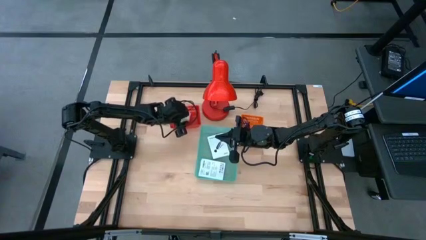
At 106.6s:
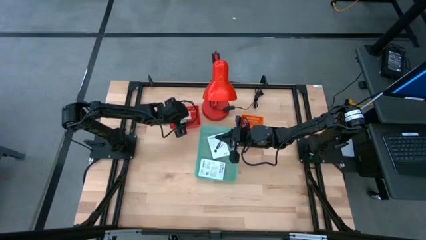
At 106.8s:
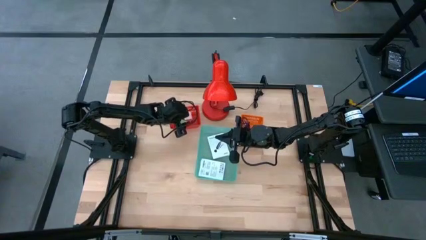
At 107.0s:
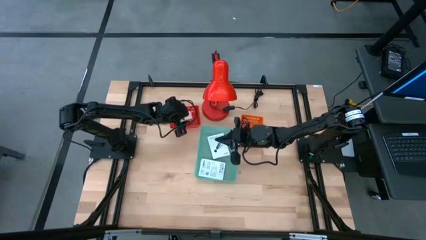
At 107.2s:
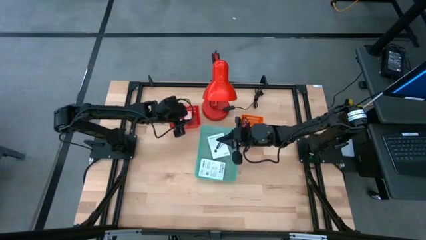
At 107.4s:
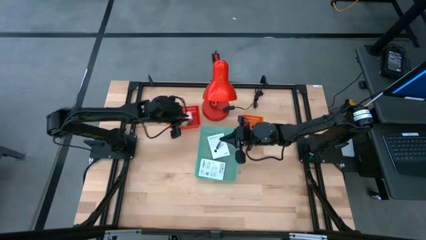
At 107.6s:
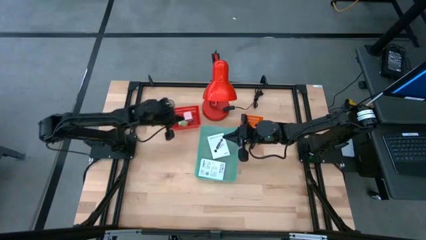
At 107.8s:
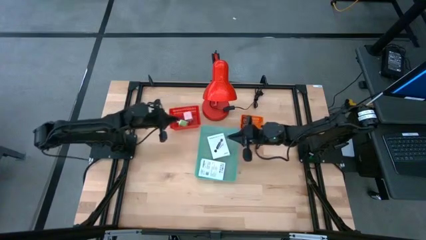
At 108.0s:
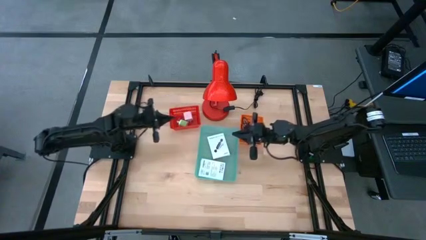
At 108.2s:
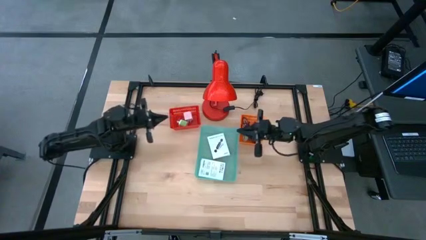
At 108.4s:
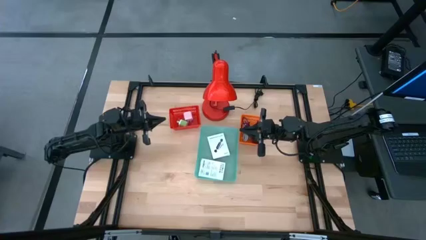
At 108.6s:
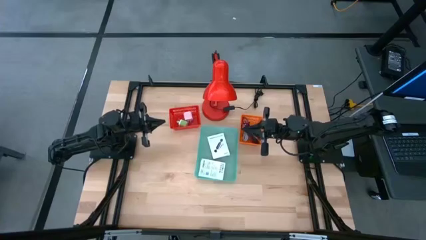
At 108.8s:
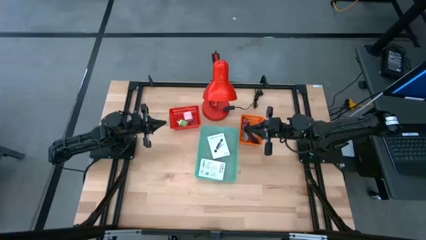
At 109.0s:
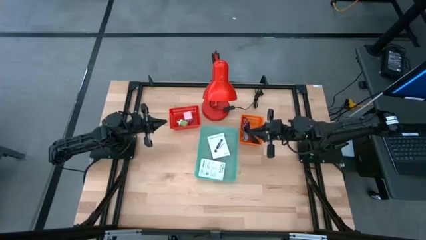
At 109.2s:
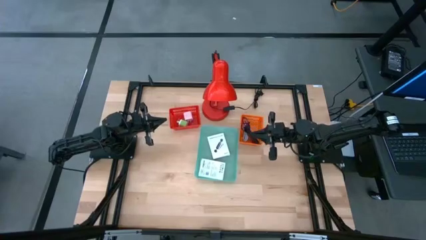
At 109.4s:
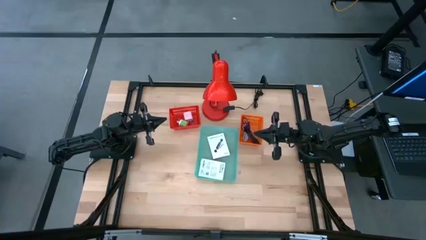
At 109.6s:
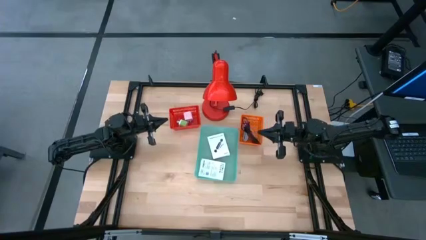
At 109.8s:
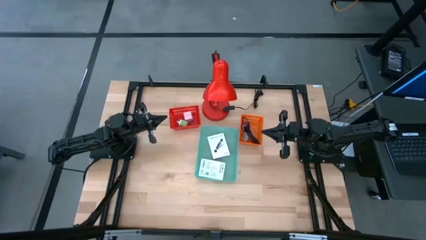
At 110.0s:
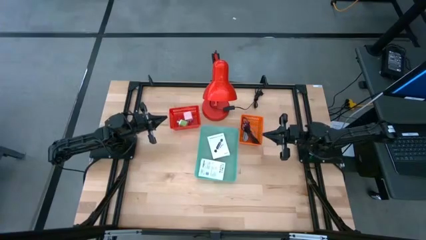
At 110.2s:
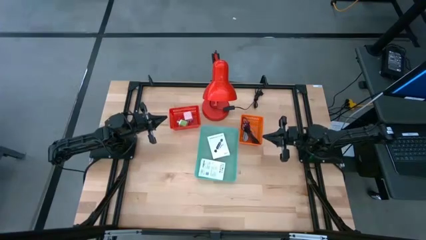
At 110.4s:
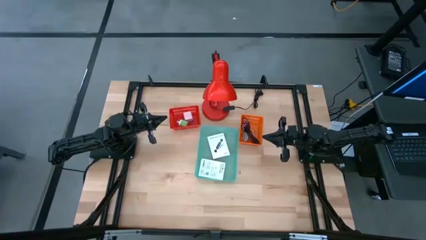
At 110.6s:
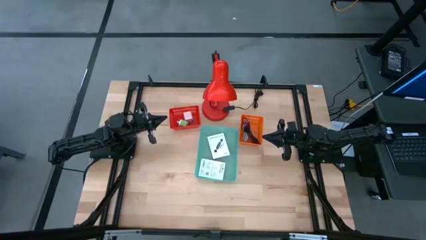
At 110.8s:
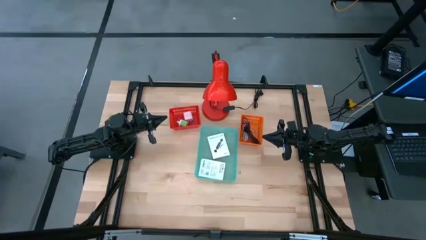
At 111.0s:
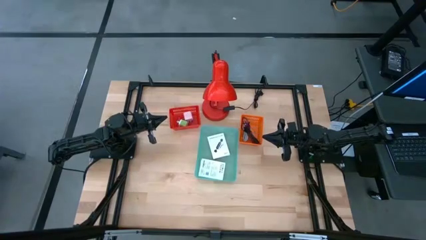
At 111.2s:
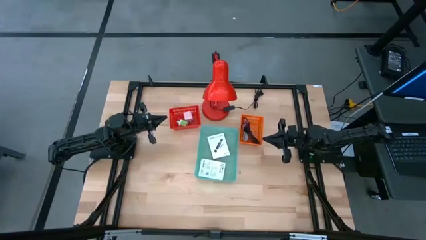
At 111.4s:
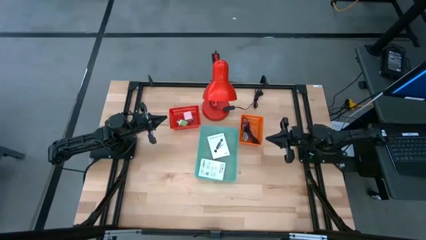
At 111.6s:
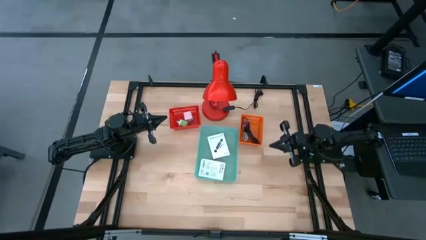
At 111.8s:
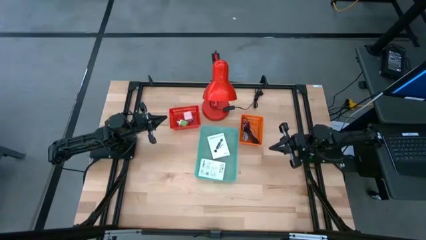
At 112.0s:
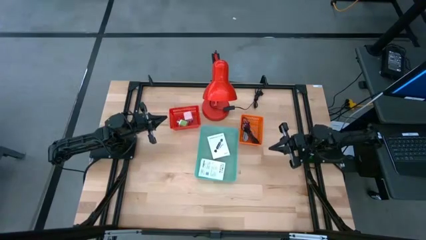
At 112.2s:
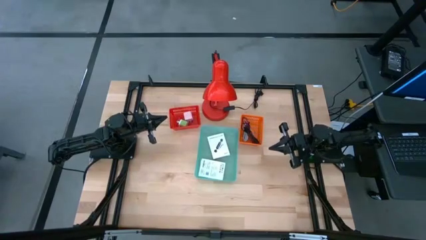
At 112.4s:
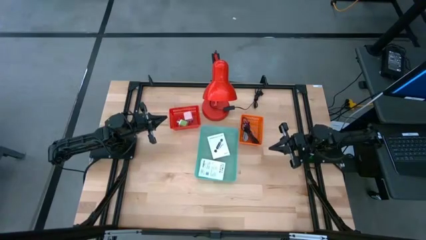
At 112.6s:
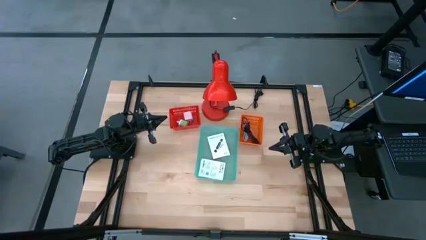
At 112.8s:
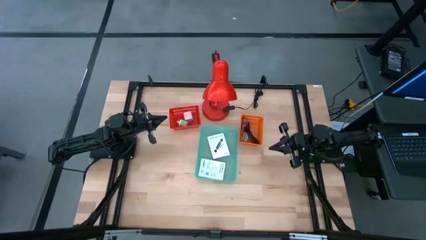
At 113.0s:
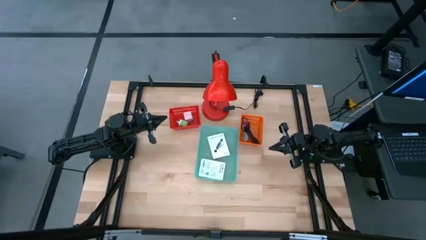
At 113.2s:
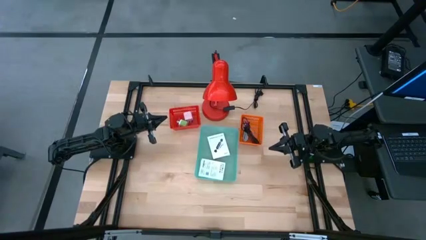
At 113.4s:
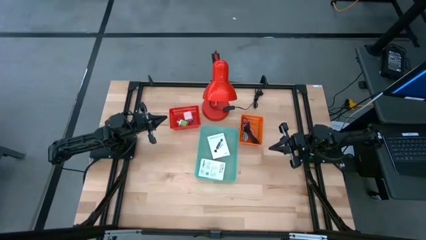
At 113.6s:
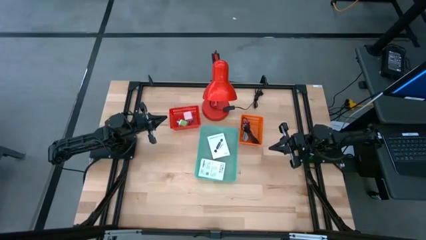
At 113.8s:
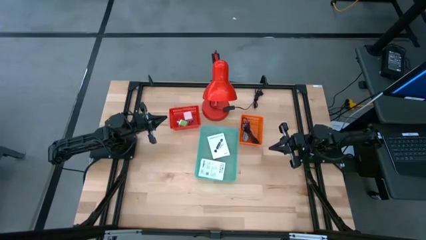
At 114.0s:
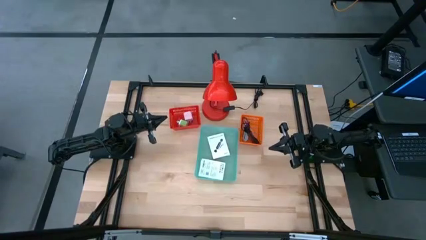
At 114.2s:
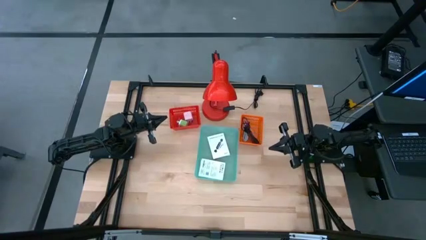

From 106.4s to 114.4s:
Task: Pick and place items into bin
Return to Home Position

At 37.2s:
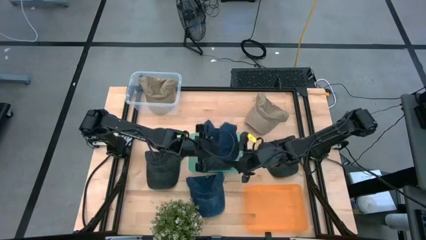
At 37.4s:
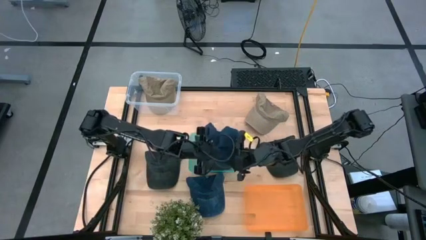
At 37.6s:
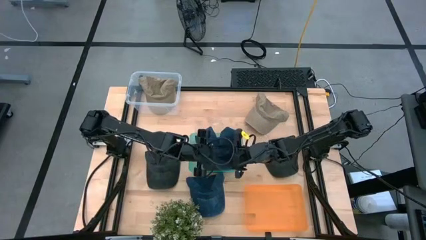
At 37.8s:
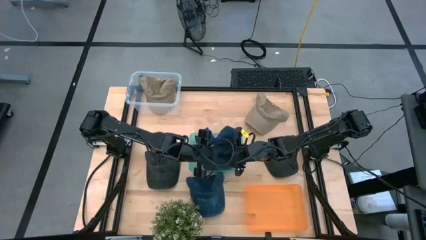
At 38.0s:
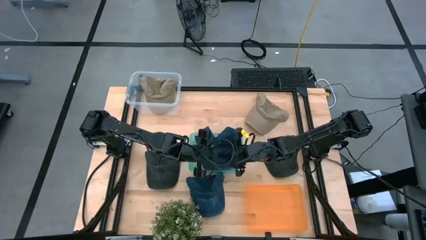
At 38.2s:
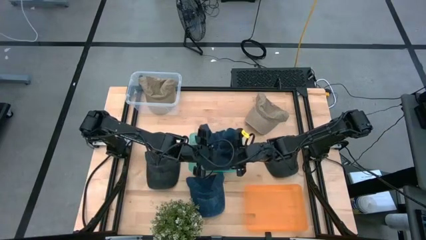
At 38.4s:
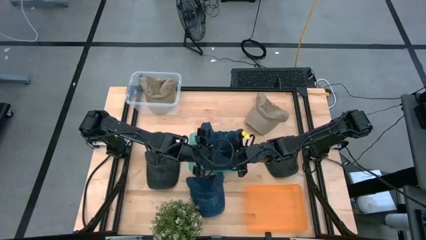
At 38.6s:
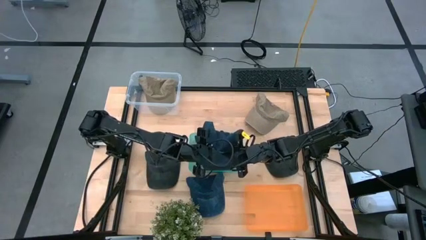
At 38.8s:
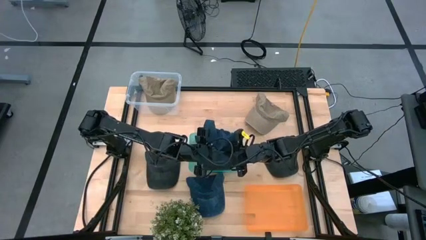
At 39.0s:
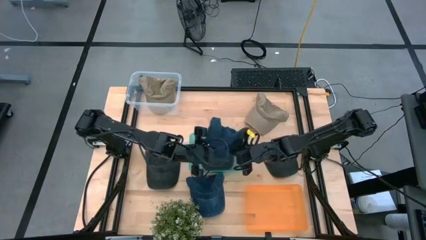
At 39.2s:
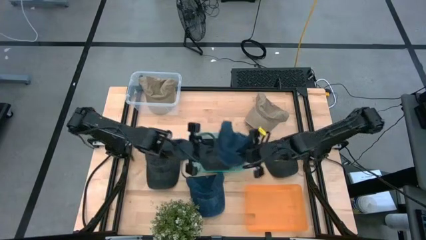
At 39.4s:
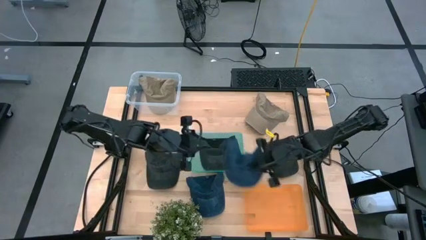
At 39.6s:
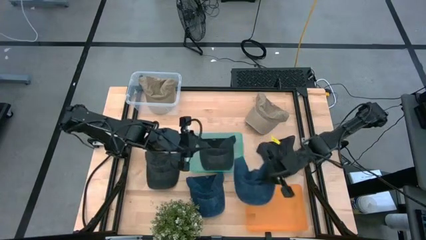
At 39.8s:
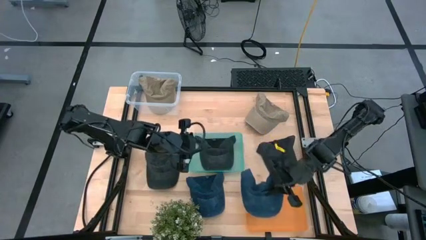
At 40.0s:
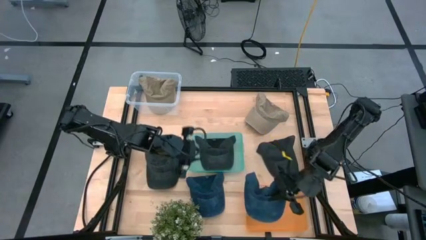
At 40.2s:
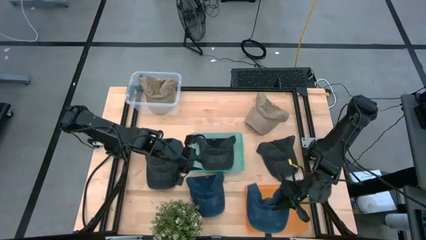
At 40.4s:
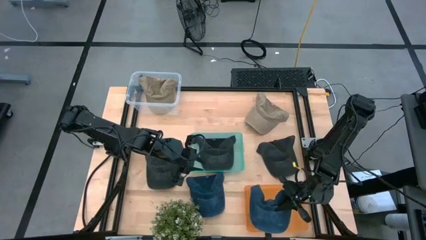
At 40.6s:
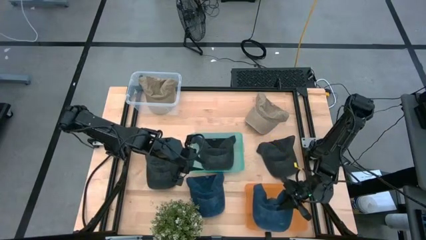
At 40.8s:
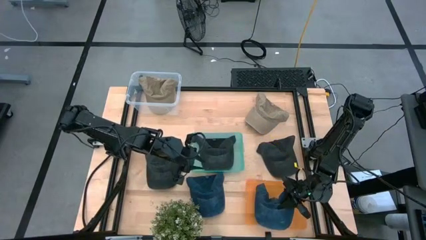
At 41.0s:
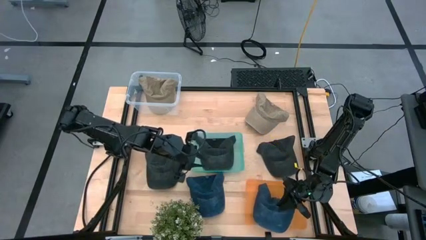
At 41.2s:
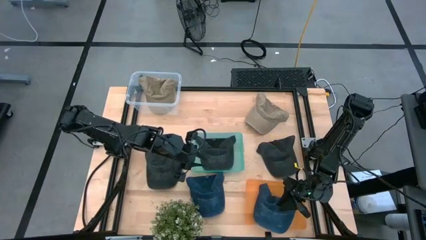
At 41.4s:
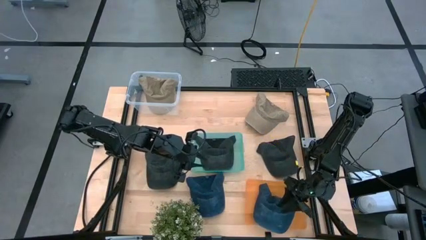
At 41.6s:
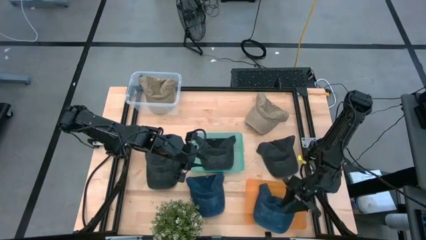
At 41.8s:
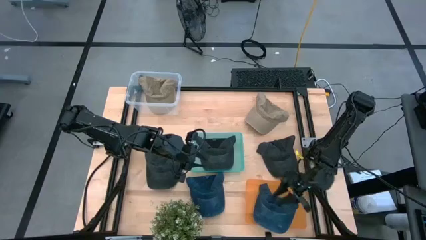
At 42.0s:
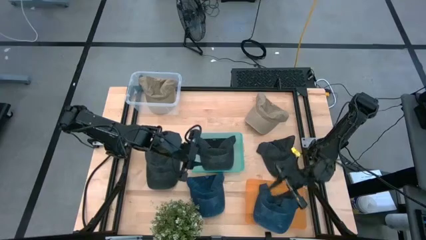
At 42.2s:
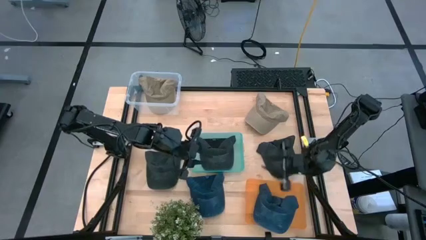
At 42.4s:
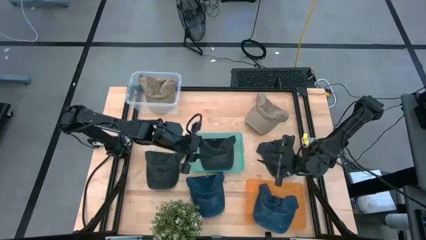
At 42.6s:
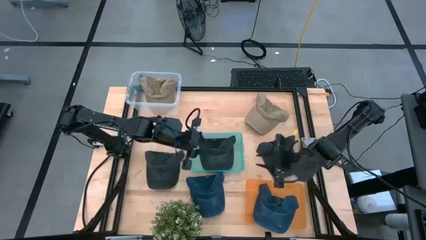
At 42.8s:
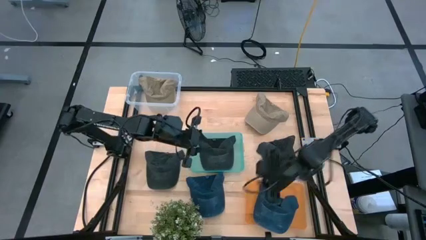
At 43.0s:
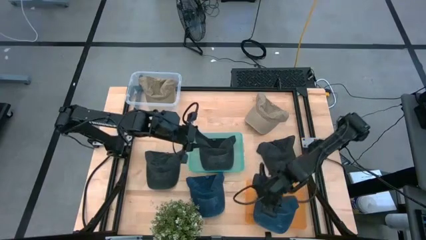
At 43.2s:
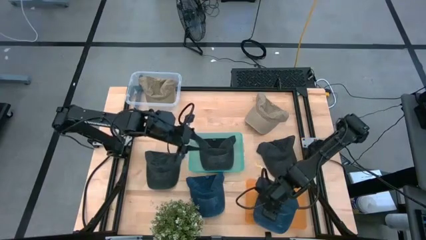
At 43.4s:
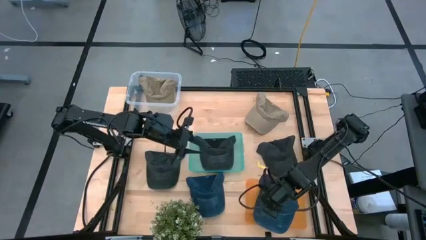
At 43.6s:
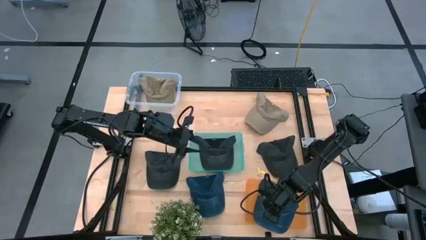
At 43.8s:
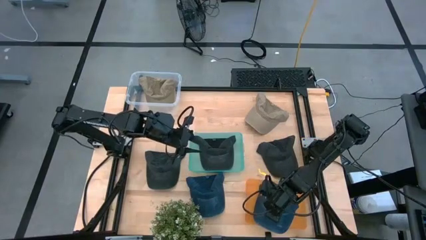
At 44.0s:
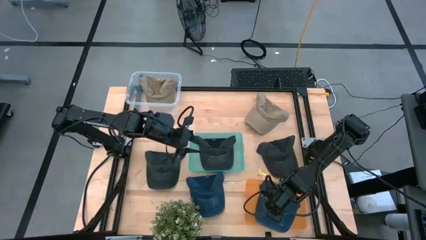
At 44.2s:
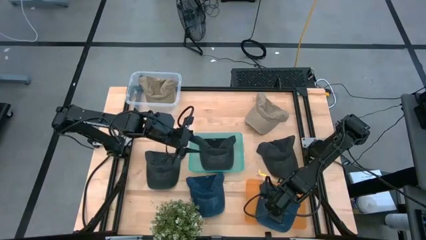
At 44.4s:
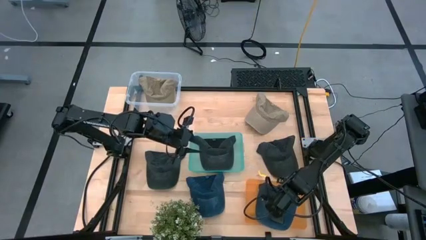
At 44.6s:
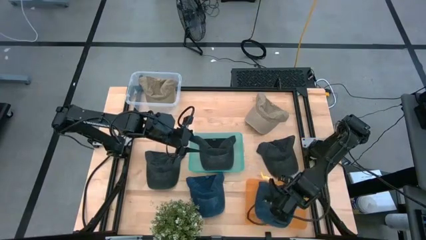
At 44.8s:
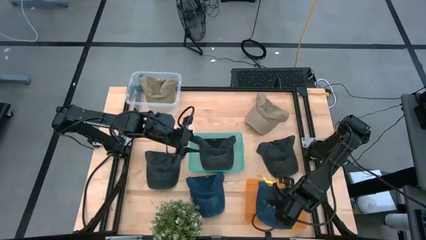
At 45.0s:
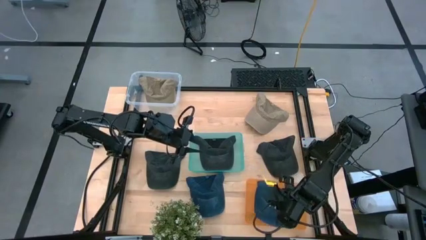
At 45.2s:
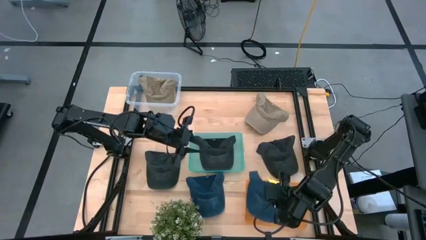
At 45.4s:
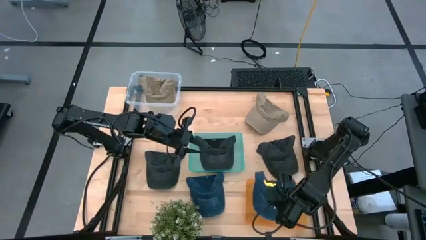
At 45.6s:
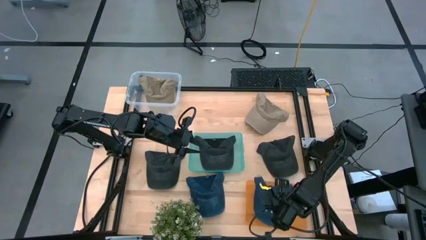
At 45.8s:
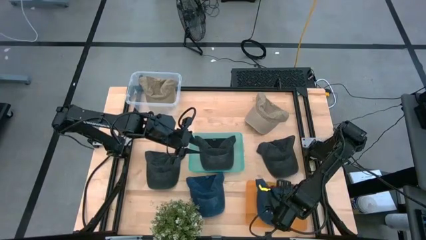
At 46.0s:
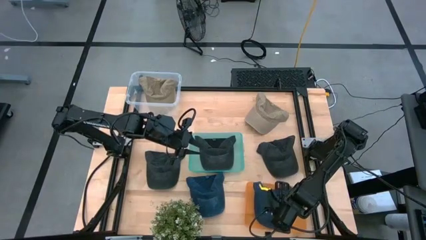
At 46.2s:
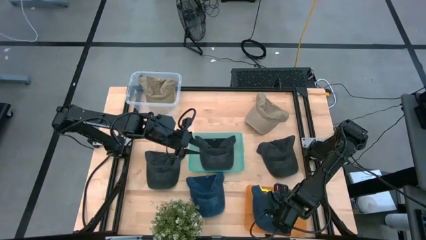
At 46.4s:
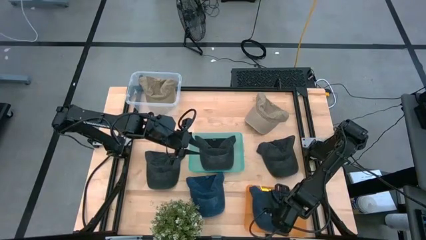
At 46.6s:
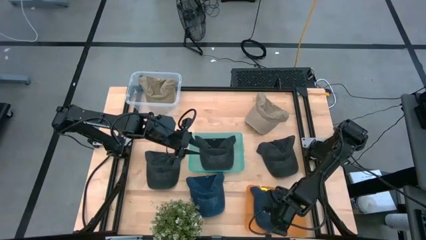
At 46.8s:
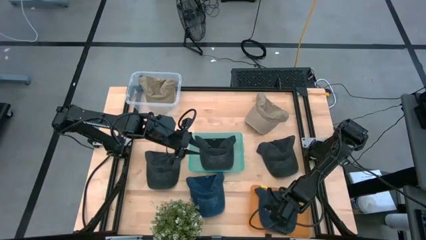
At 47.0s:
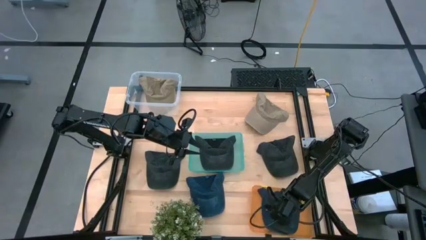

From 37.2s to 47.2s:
Task: Pick & Place hat
Put the left blue cap into the orange bin
